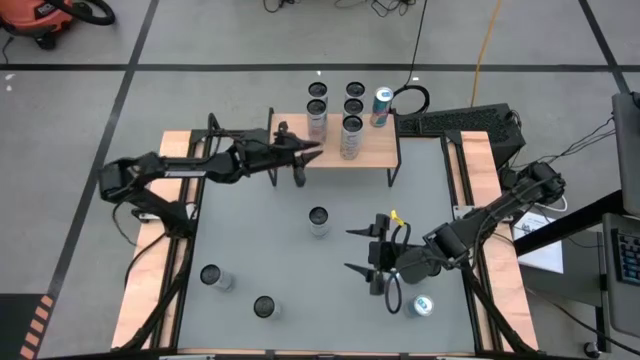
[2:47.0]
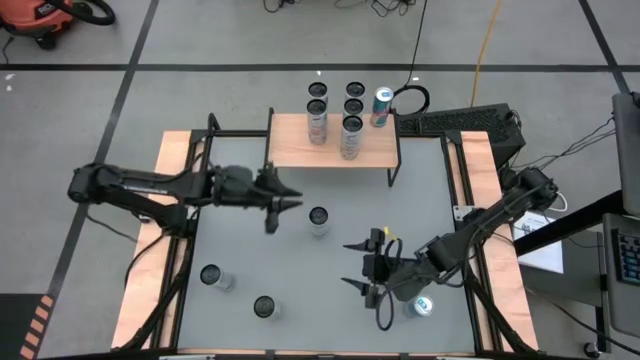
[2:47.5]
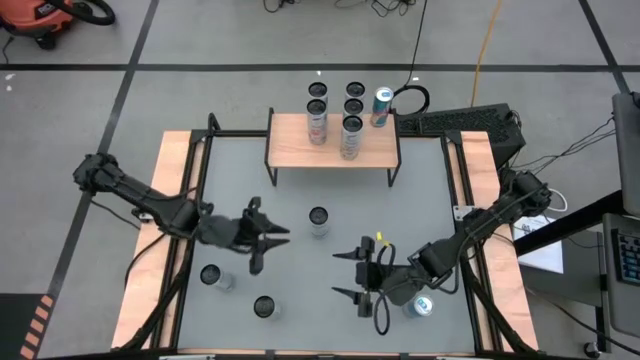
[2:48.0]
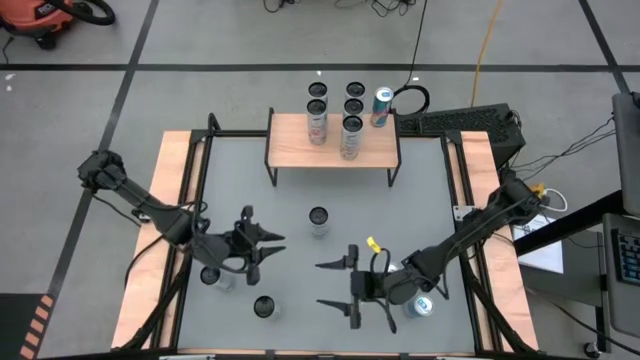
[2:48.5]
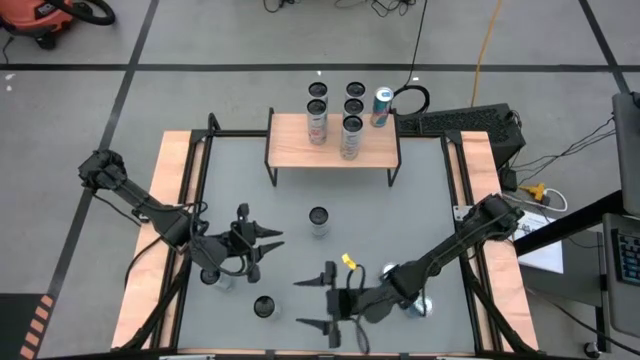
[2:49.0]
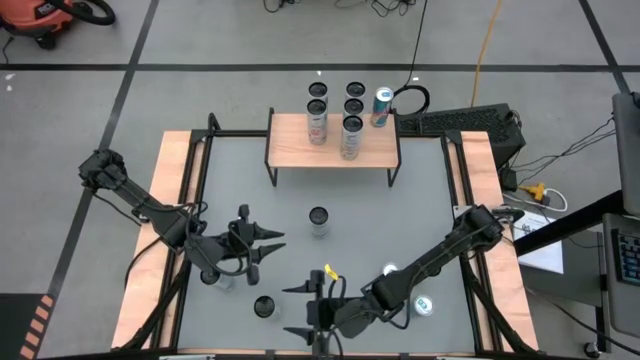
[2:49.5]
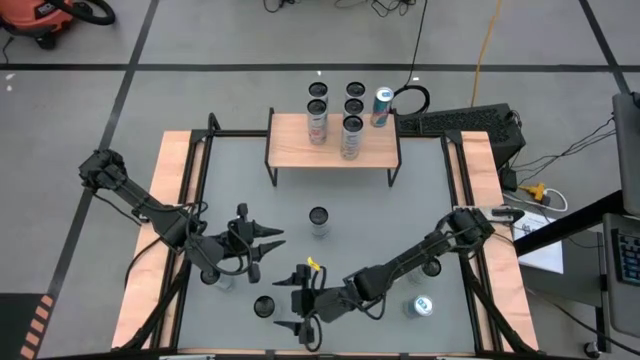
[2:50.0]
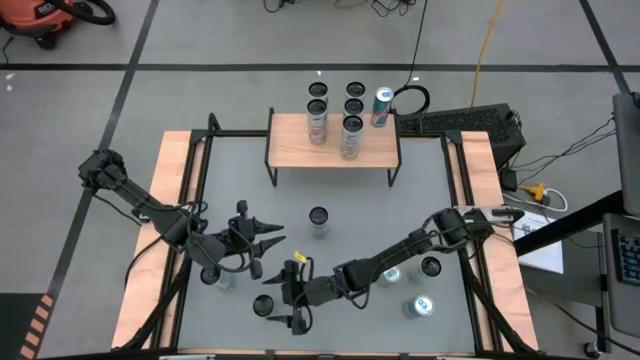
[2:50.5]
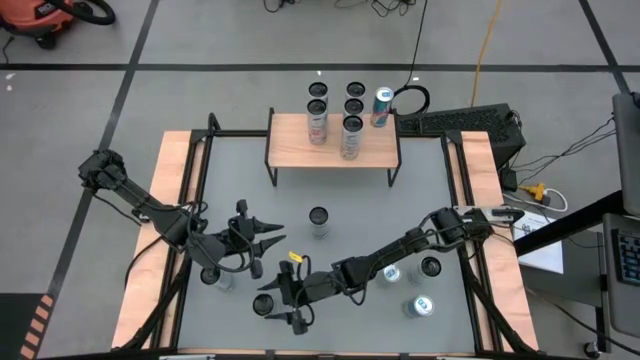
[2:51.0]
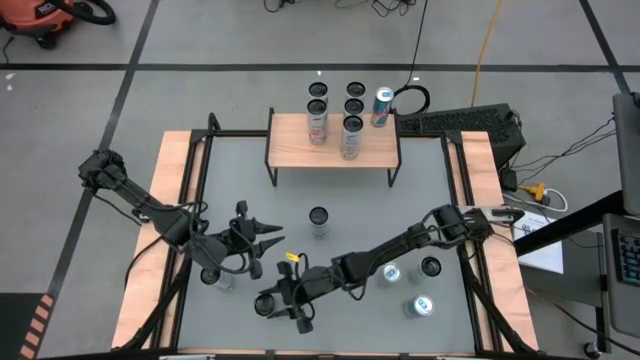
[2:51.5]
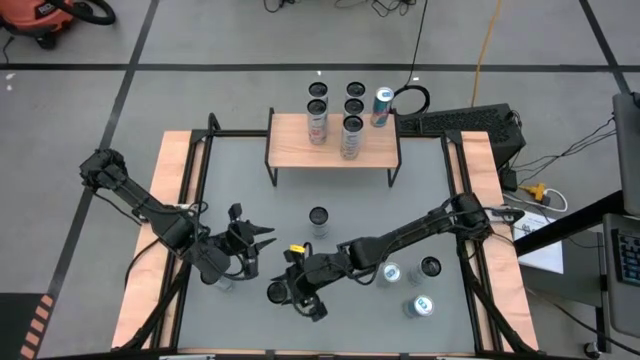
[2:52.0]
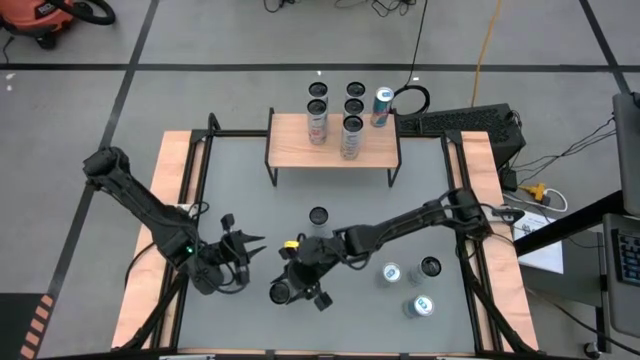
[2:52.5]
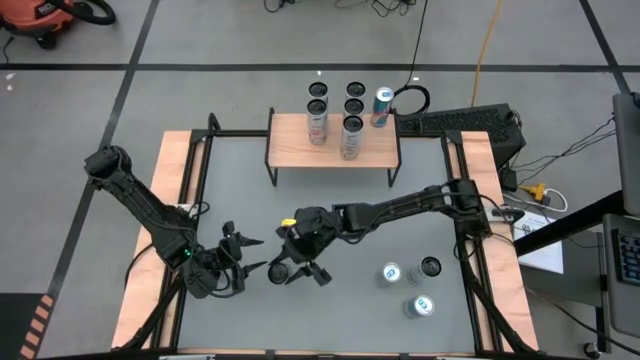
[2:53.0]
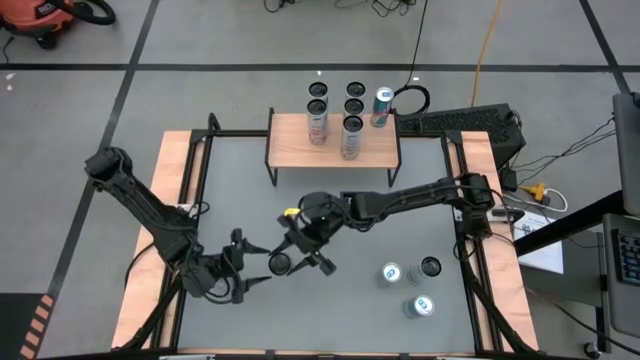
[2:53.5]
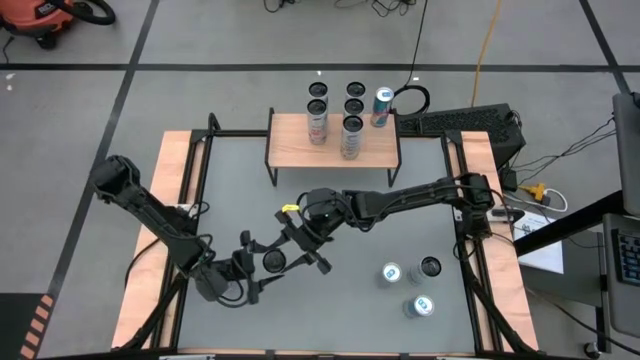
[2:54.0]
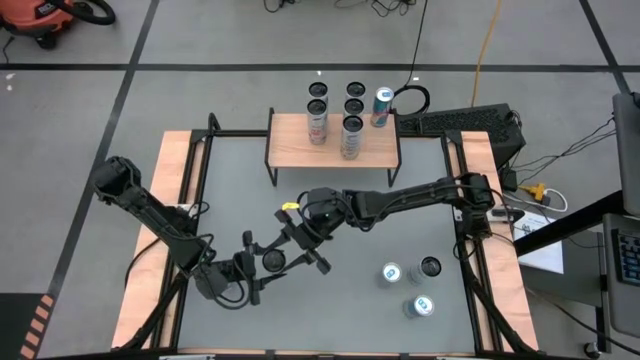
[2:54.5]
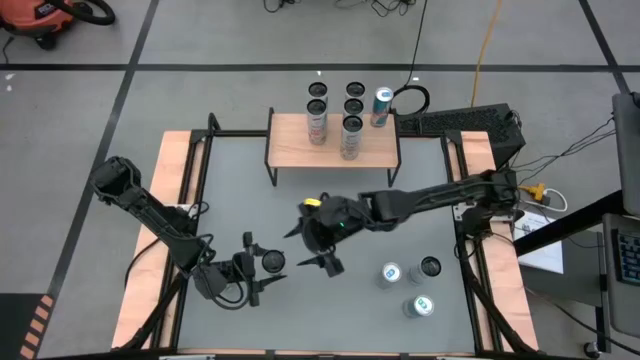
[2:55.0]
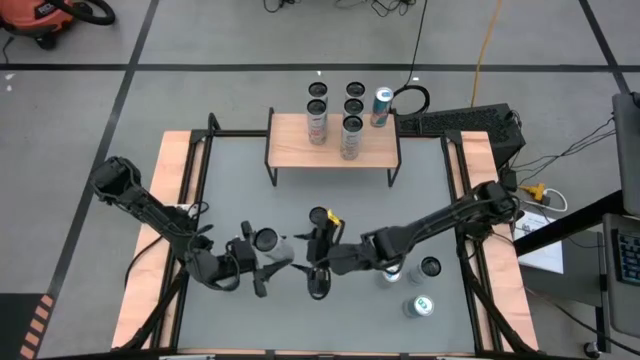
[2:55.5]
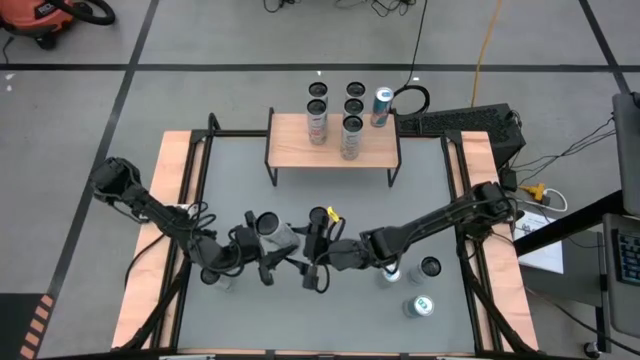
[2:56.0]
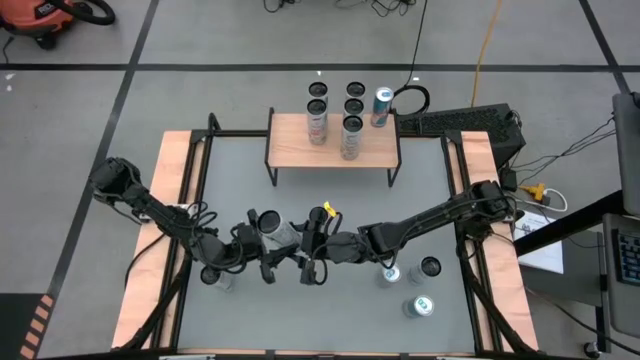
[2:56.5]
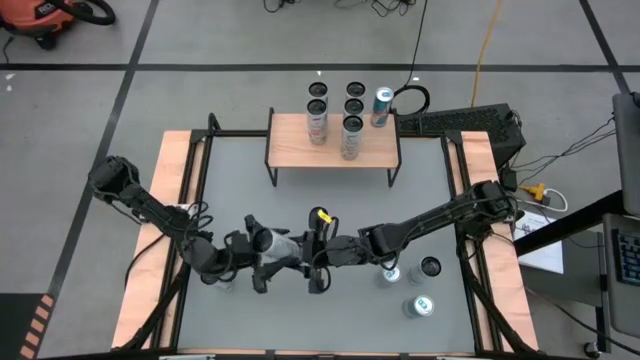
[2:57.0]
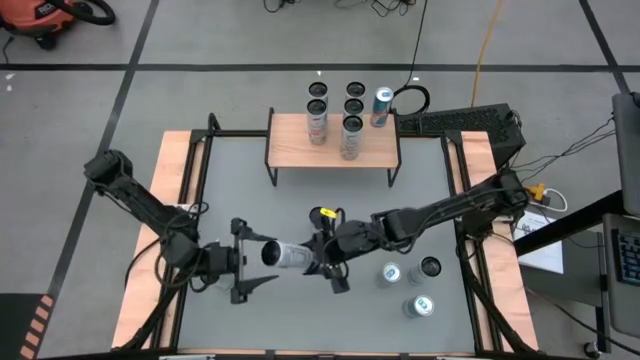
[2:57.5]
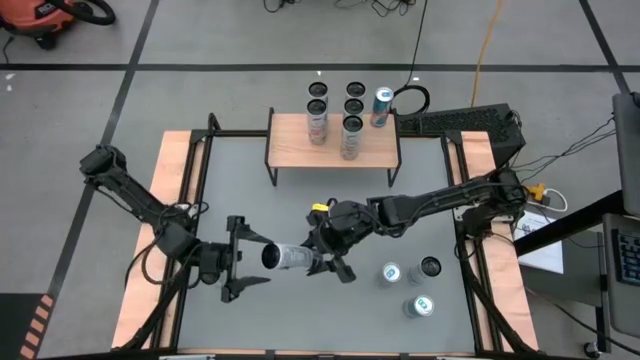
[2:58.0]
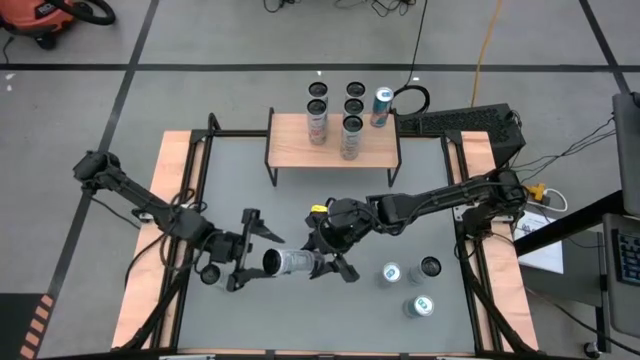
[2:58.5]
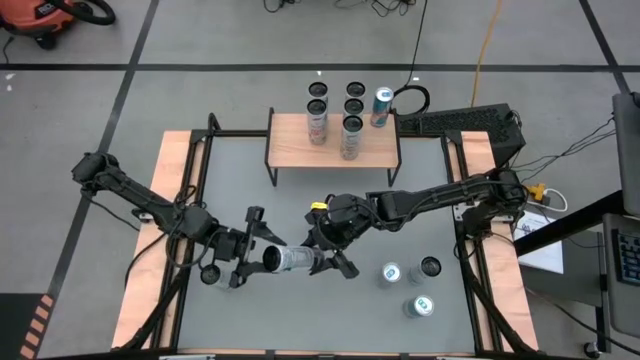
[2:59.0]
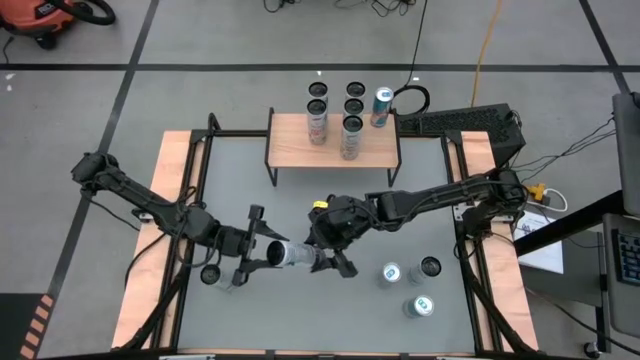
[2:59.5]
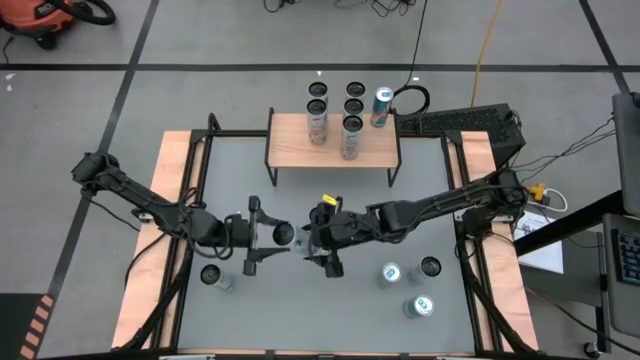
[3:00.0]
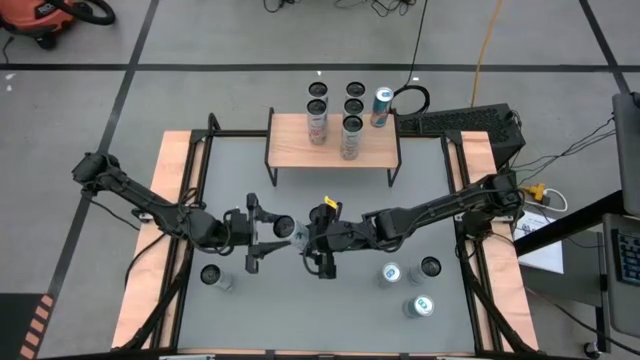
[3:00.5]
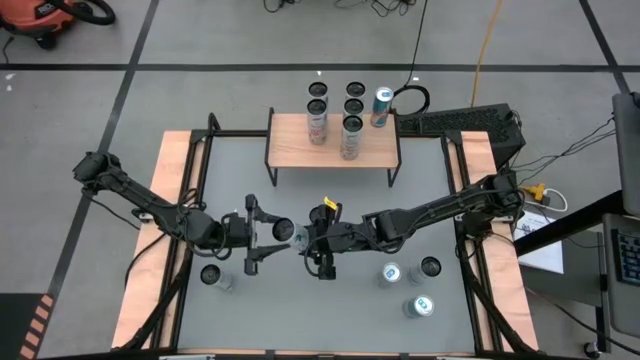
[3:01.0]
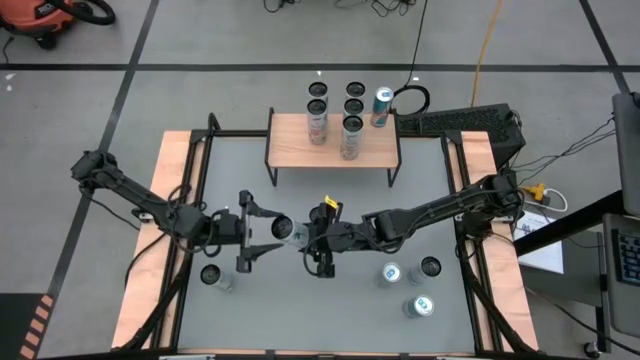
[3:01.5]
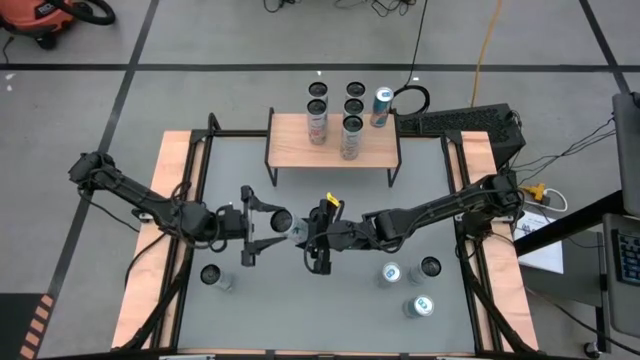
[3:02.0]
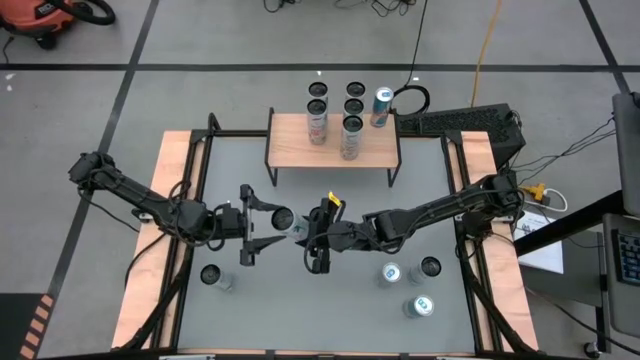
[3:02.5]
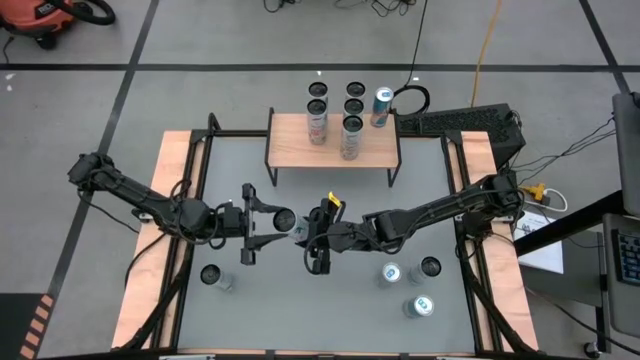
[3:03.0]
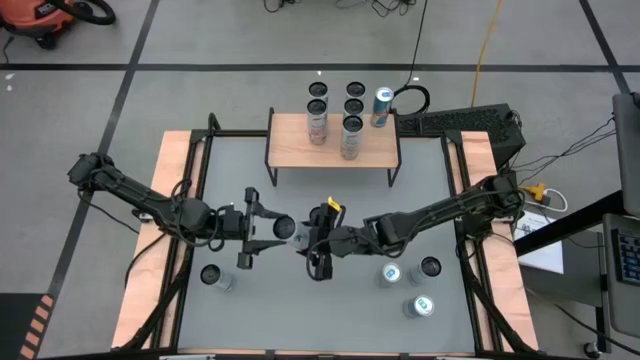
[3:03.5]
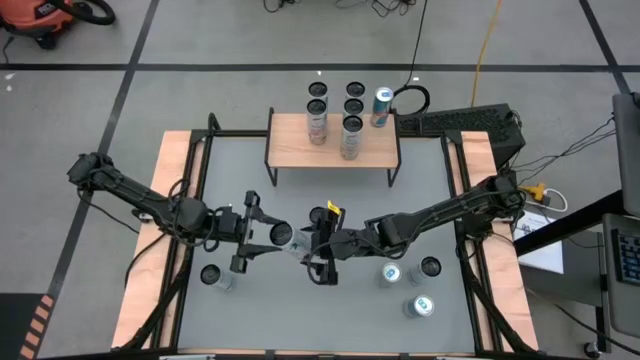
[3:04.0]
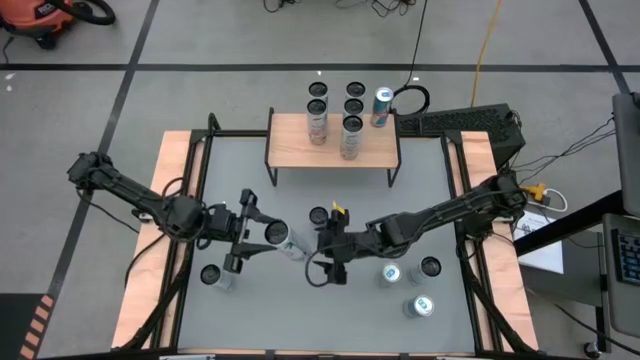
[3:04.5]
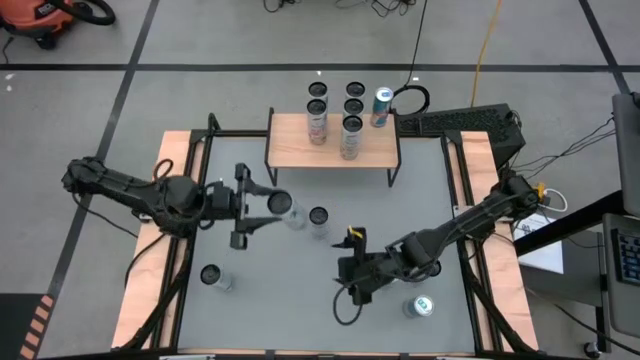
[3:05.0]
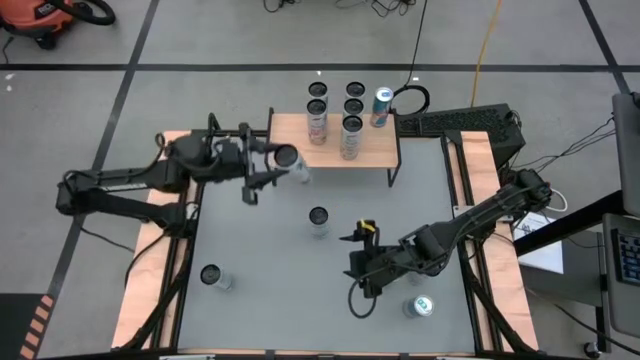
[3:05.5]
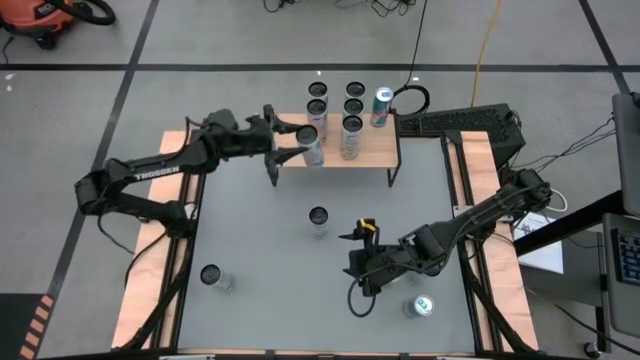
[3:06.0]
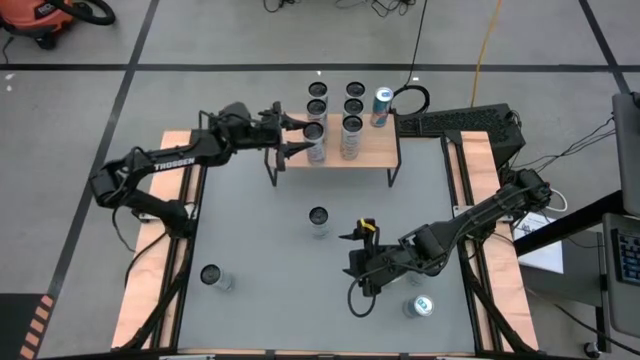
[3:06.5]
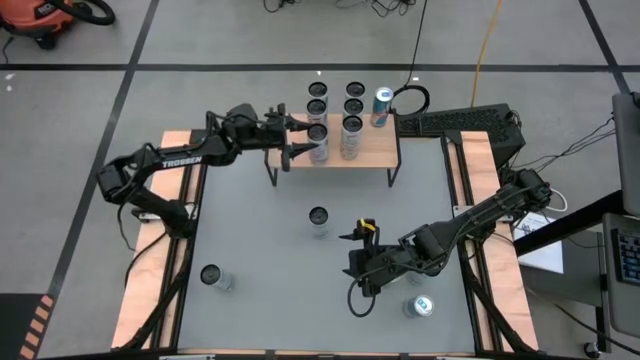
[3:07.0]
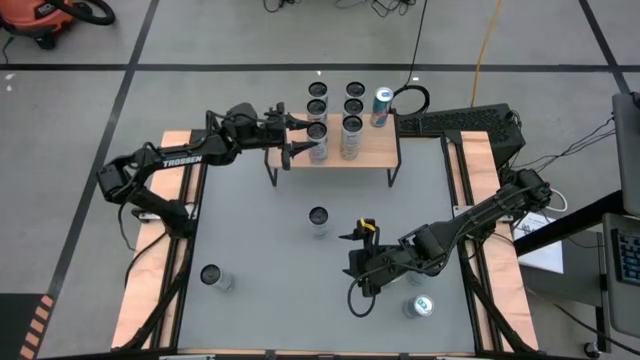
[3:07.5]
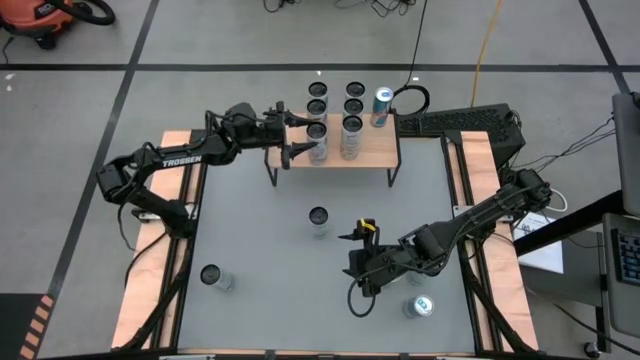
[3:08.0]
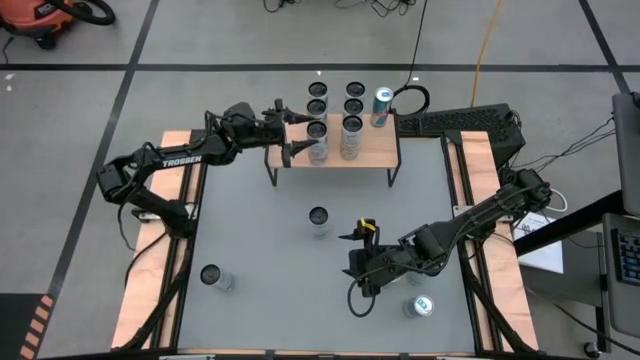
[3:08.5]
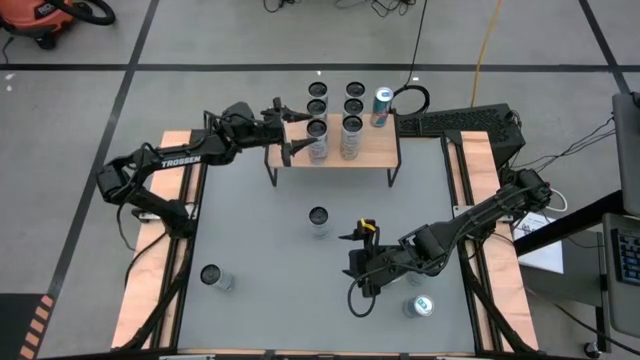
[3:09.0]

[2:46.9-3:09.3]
Task: Place canned beverage on shelf
Put the white pink soda can on the shelf aligned with the other white pink soda cans
